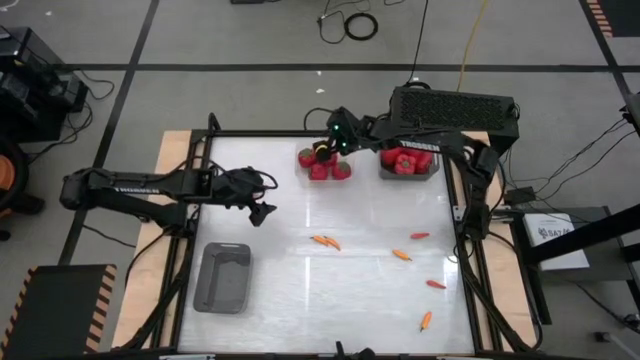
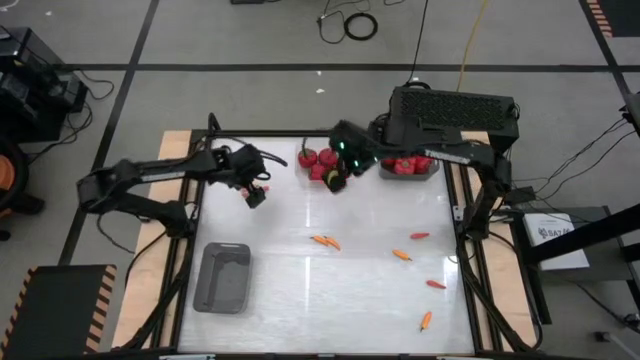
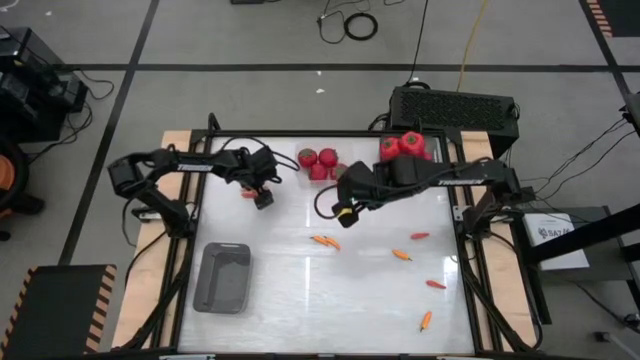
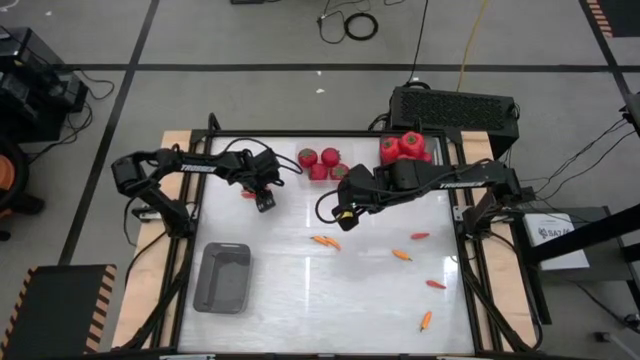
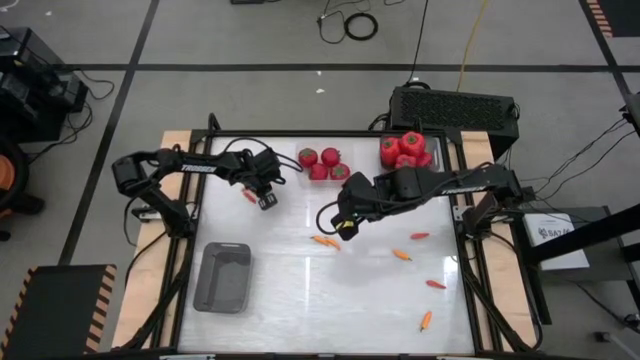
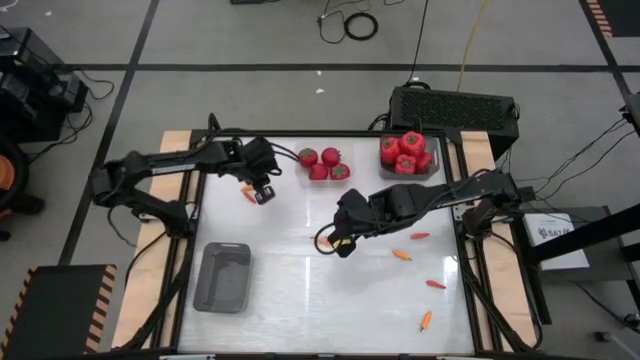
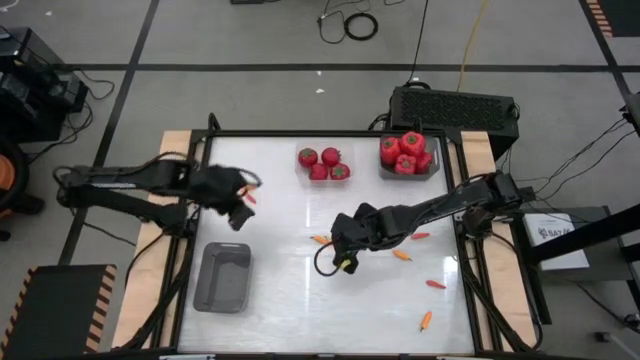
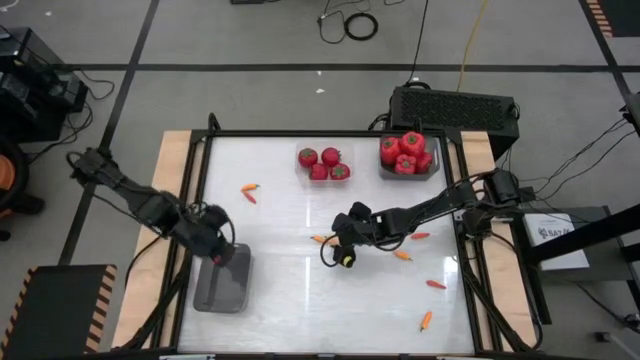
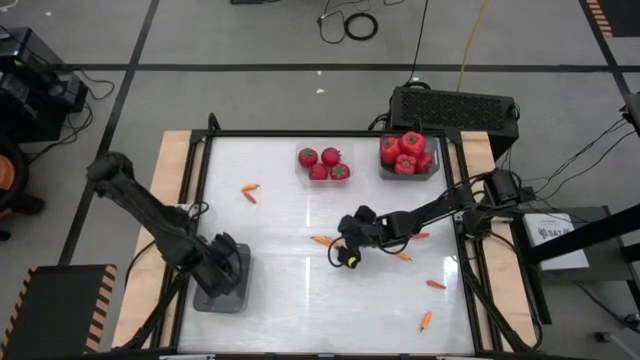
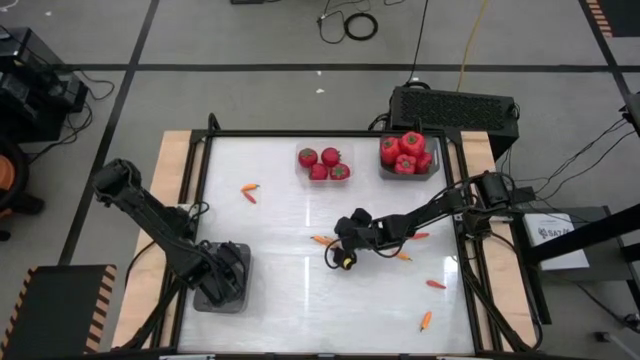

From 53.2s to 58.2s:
Task: Sort produce into baskets
Put the orange chili into the bottom gray bin

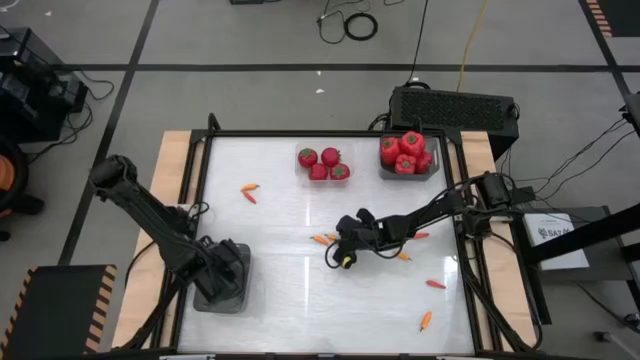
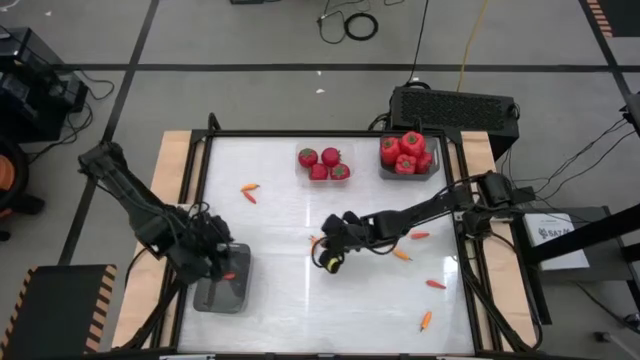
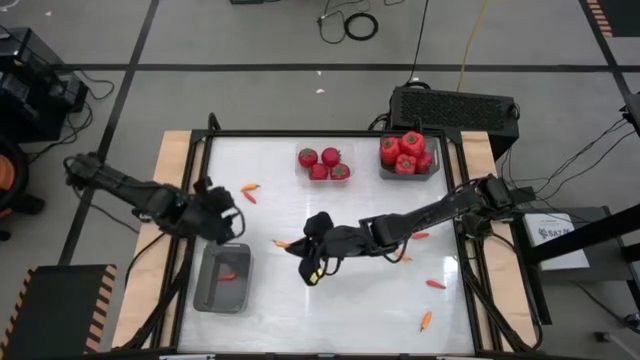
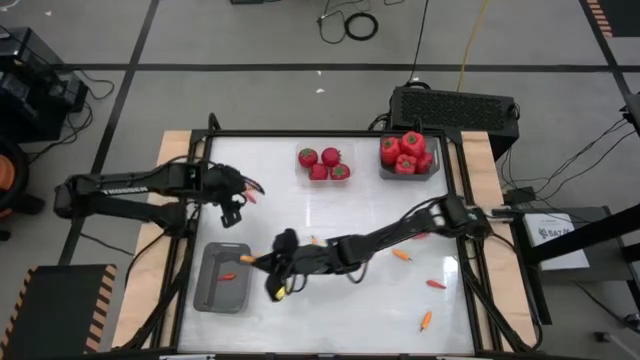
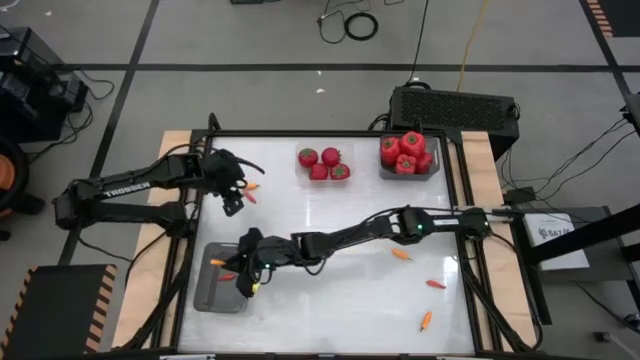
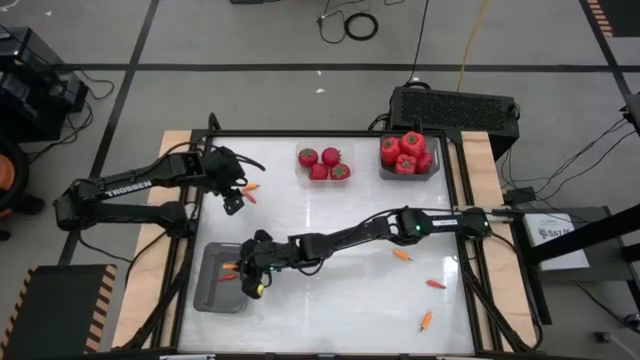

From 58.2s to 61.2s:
Put the yellow chili into the bottom gray bin

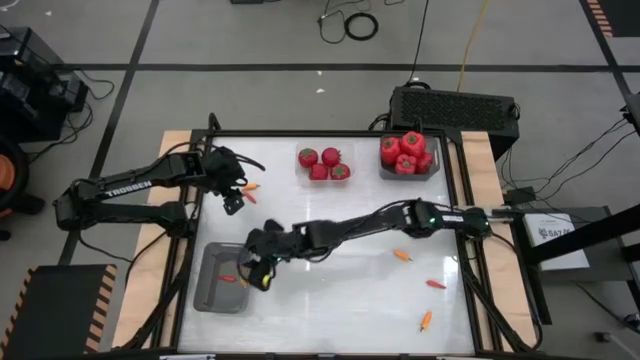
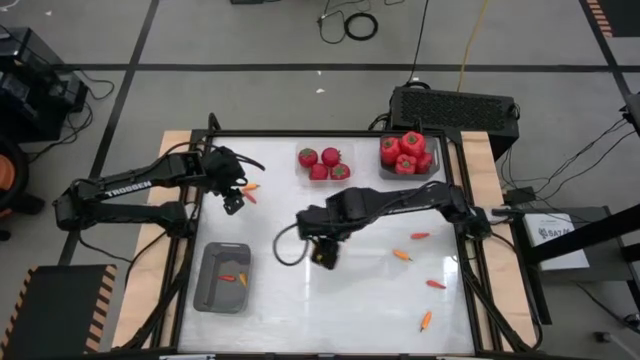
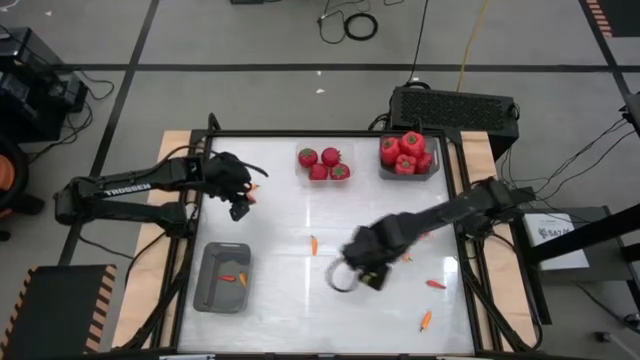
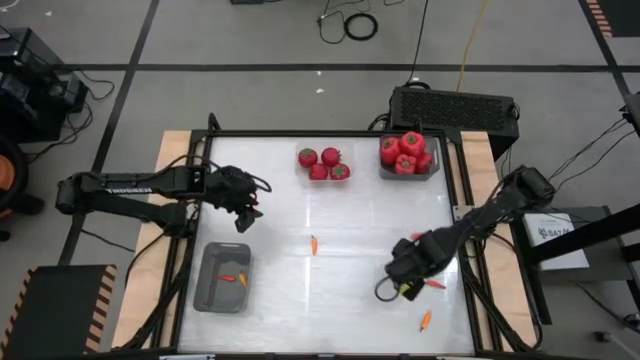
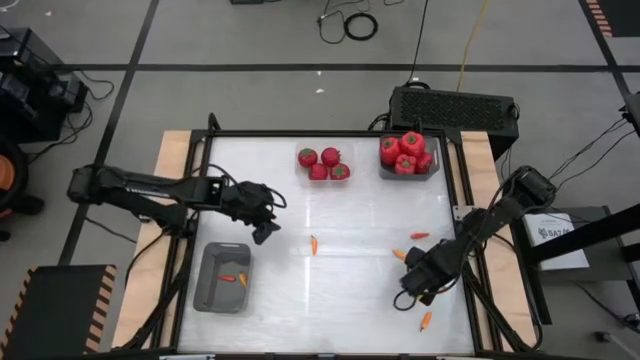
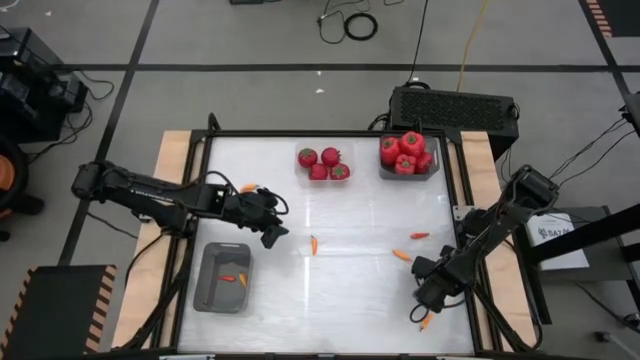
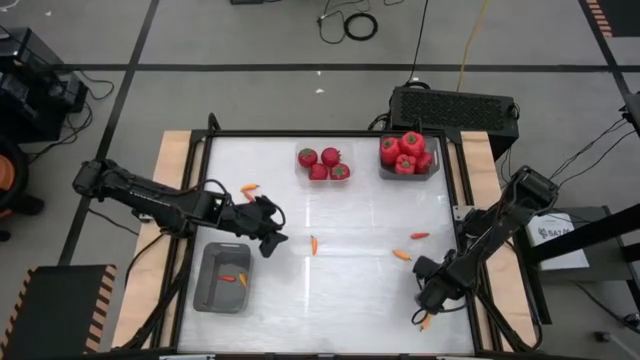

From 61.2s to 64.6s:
Put the orange chili into the bottom gray bin

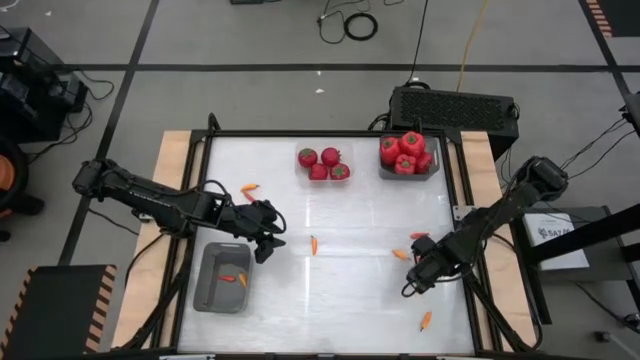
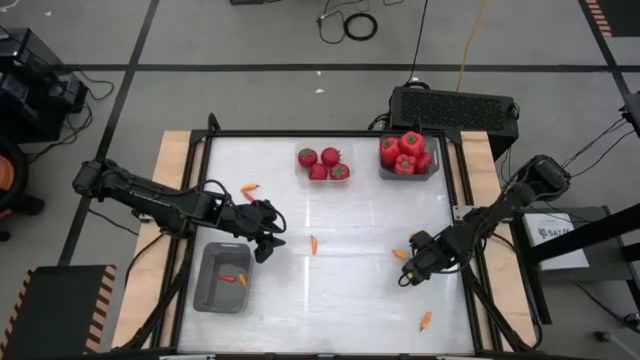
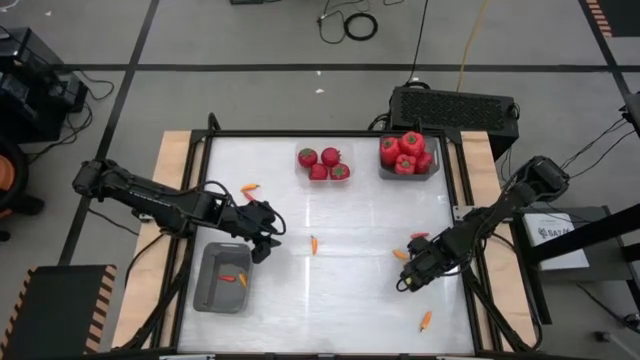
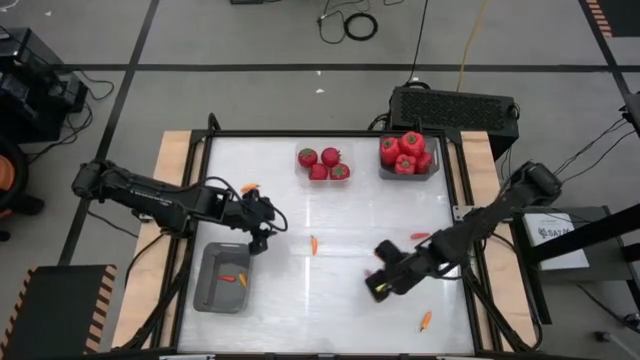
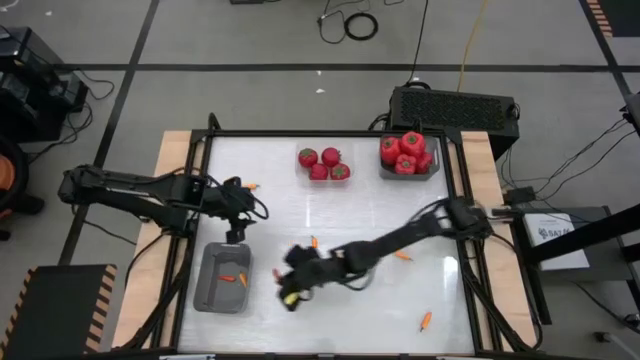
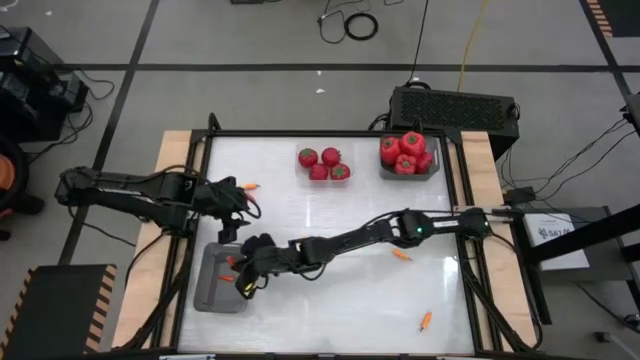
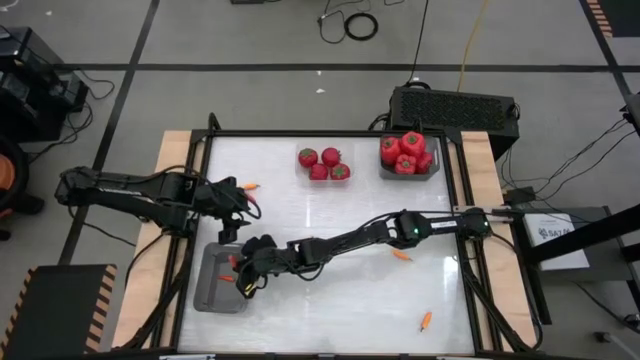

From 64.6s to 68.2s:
Put the orange chili into the bottom gray bin

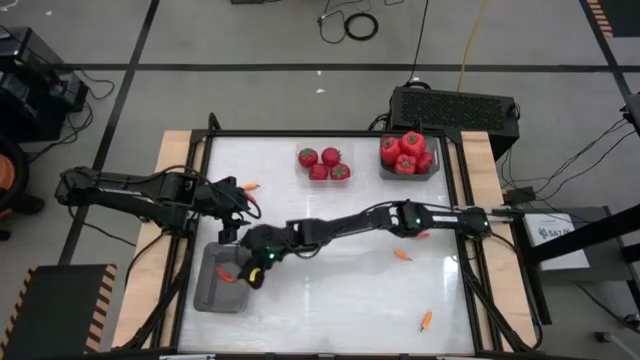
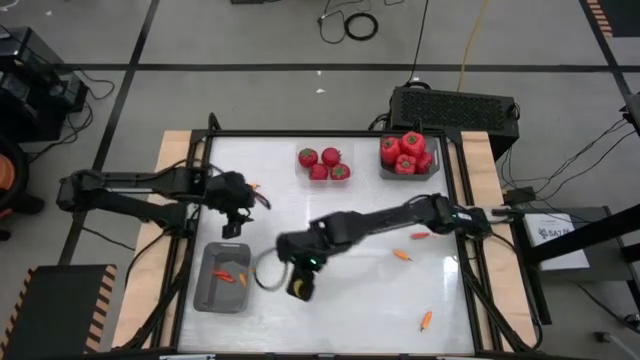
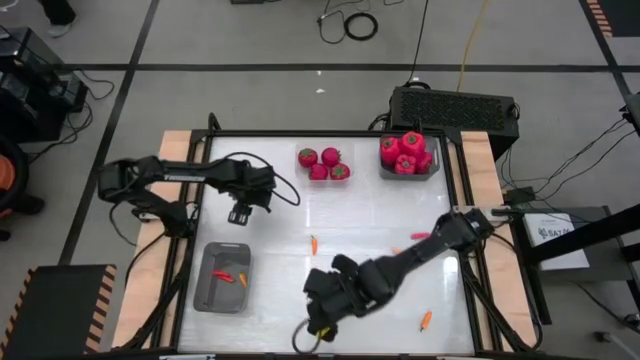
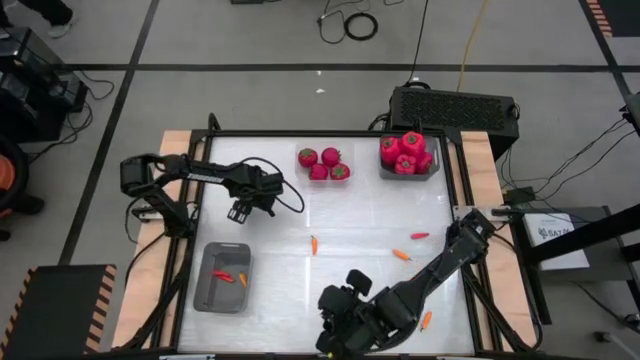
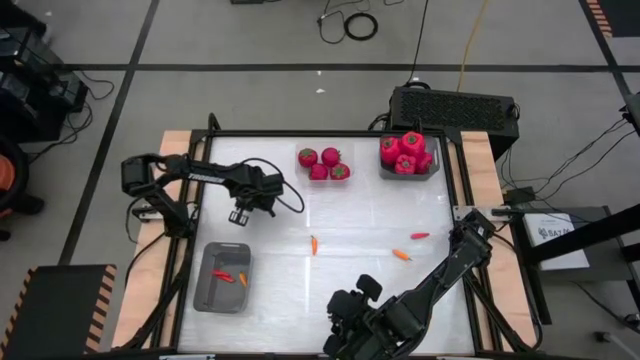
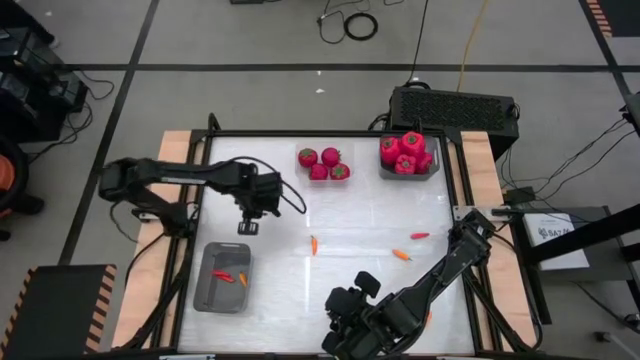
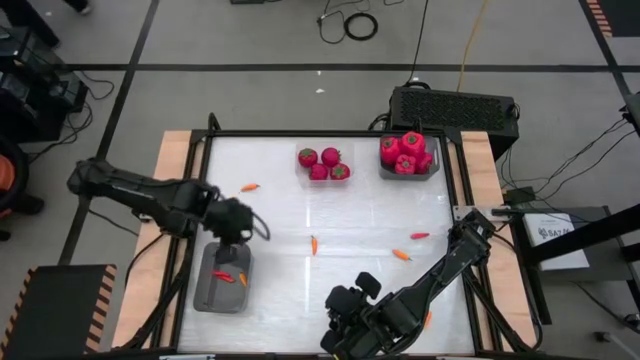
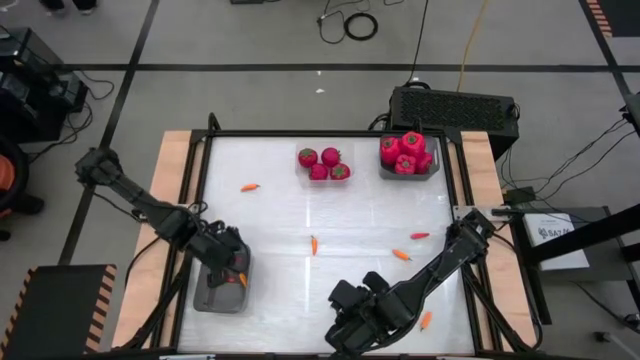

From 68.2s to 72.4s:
Put the orange chili into the bottom gray bin

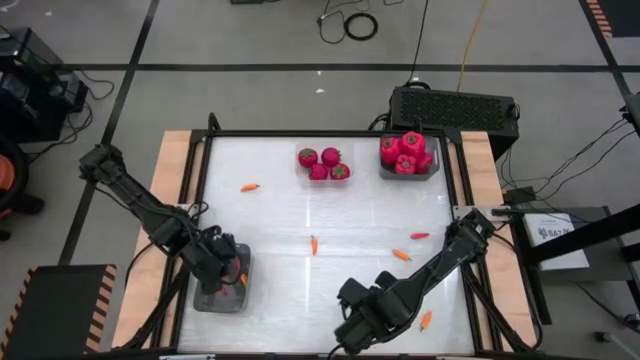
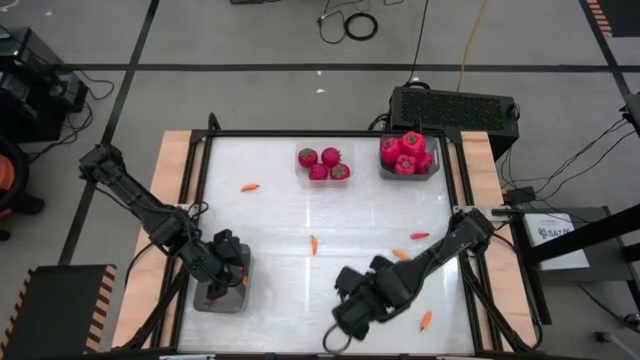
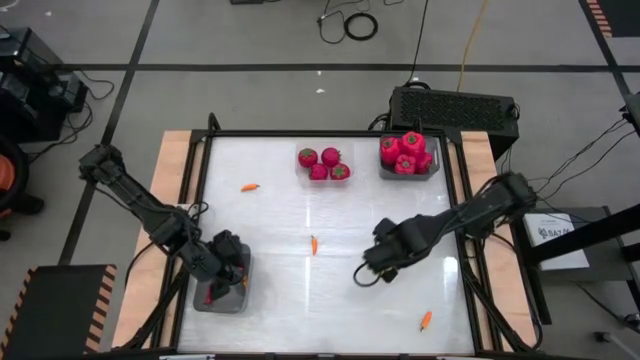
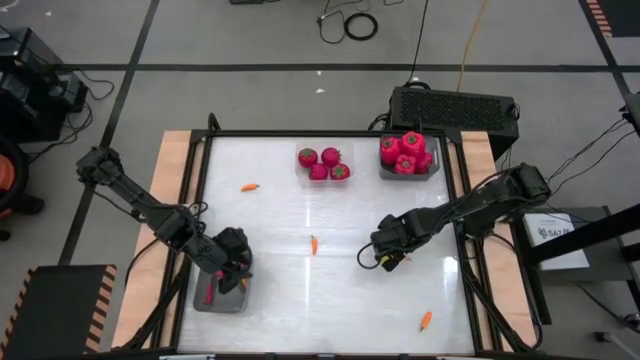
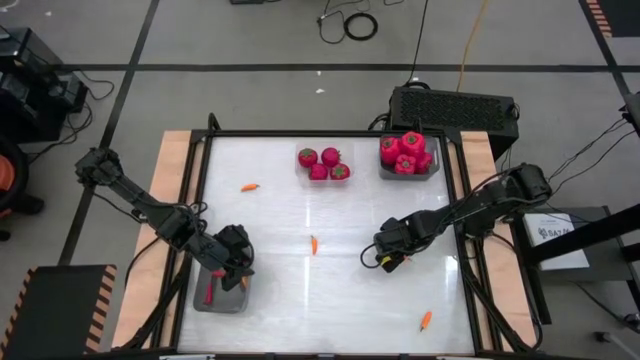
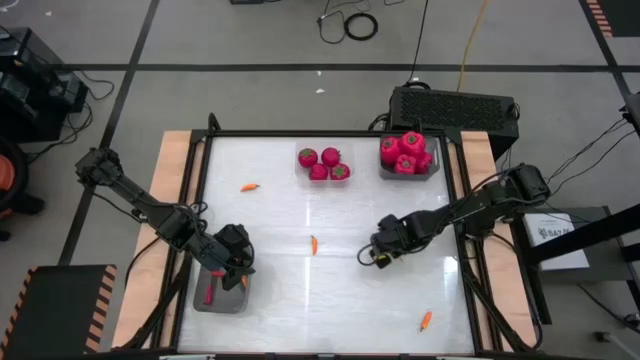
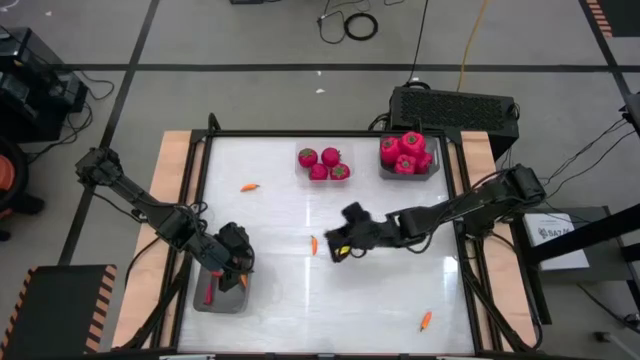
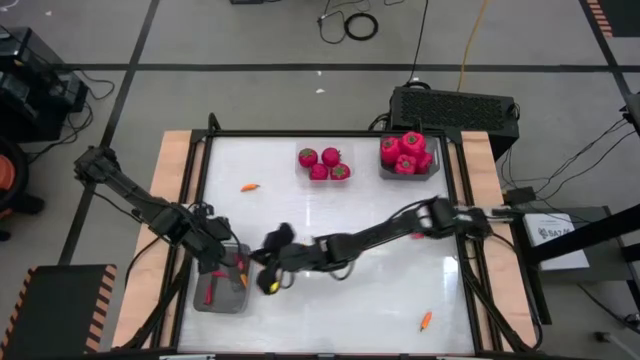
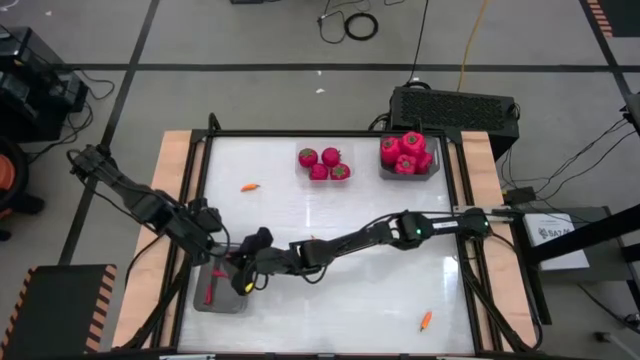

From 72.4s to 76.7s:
Put the yellow chili into the bottom gray bin
